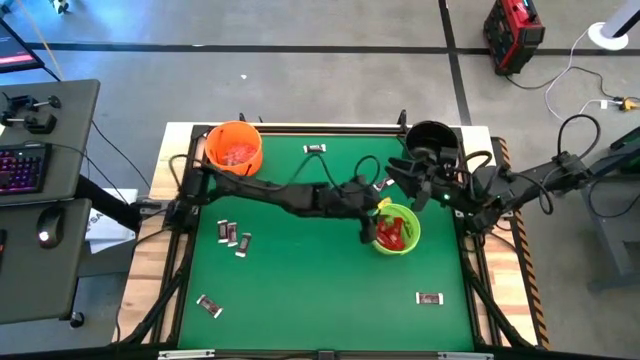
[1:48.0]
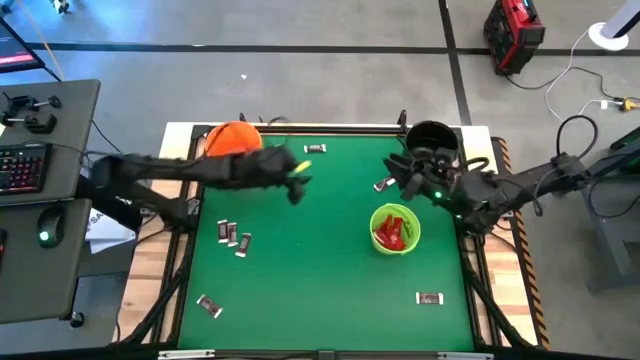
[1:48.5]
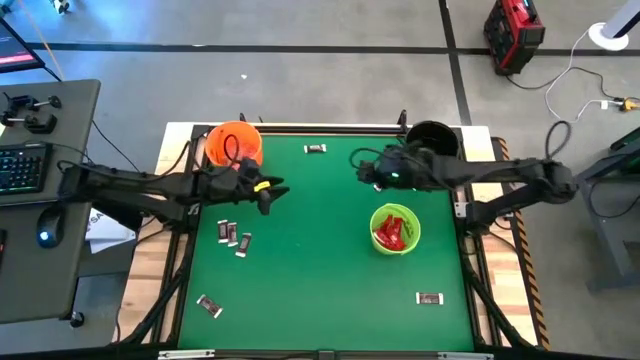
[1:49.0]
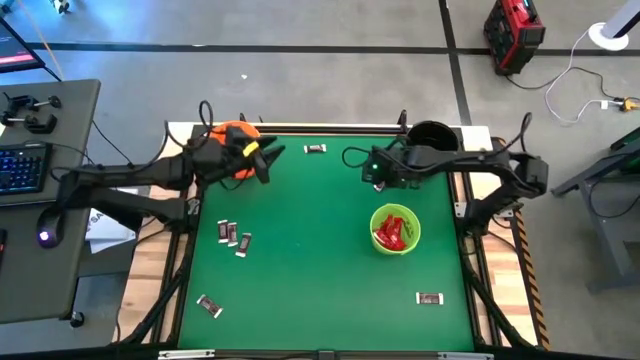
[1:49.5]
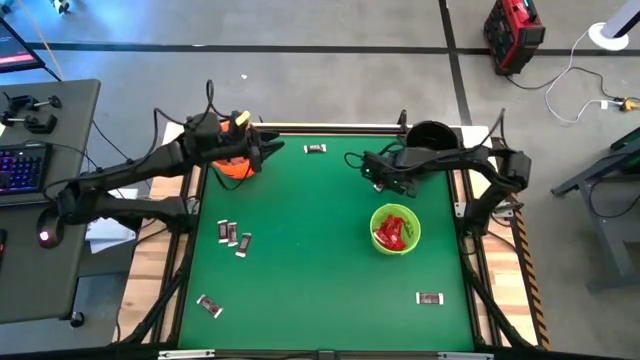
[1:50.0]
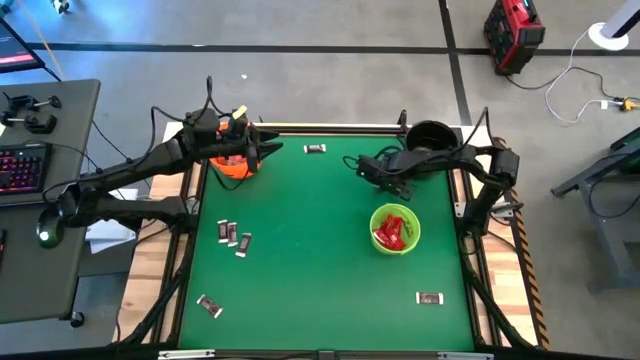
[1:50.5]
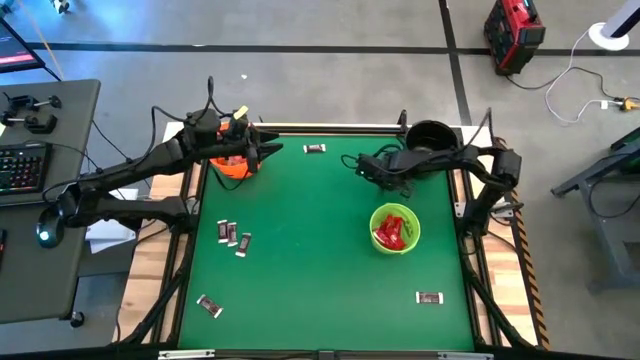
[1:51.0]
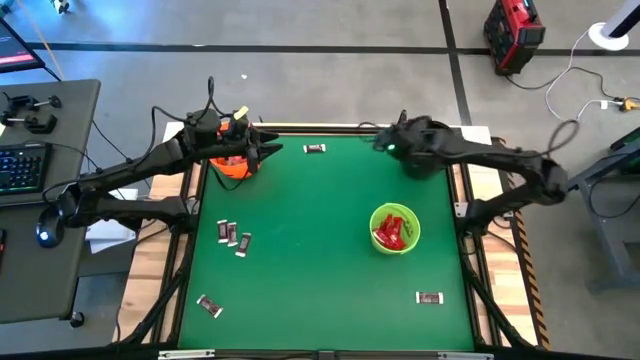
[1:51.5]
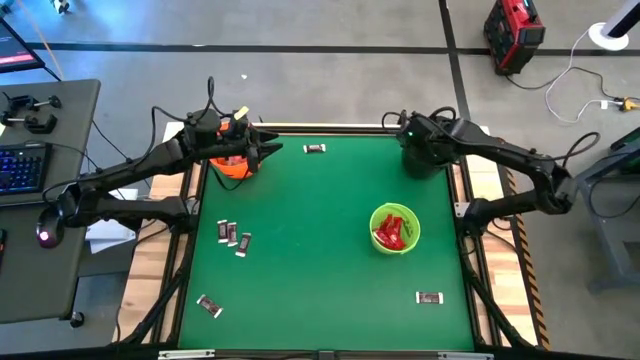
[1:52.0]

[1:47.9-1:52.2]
Task: Sort candy by brand, put in halloween buckets
Put the brown chocolate bar into the black bucket

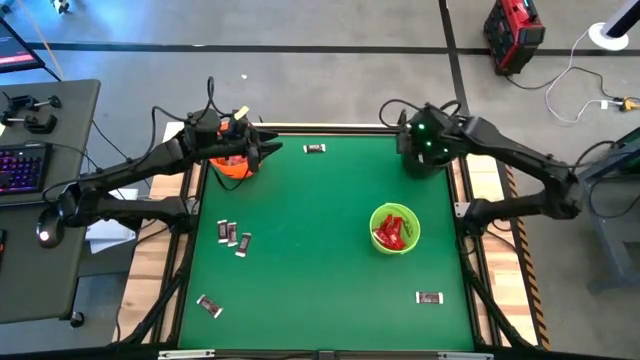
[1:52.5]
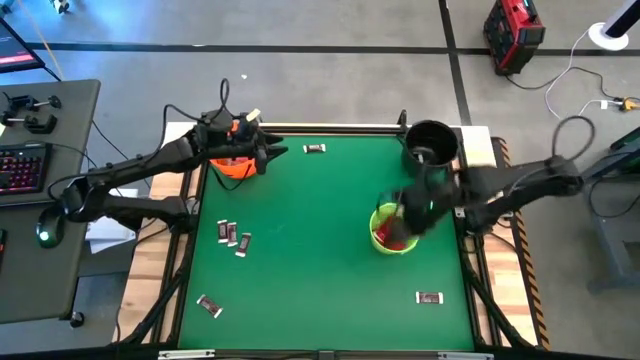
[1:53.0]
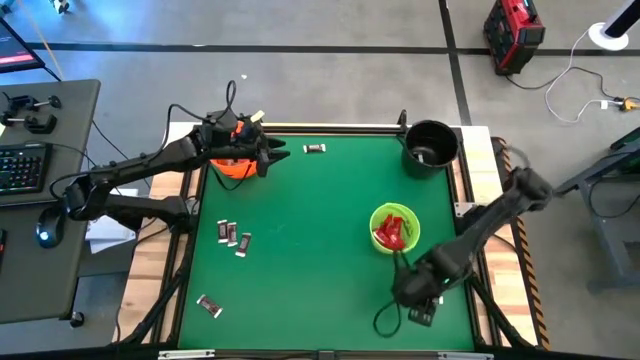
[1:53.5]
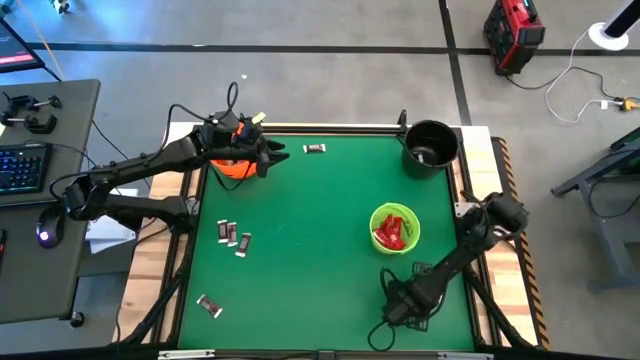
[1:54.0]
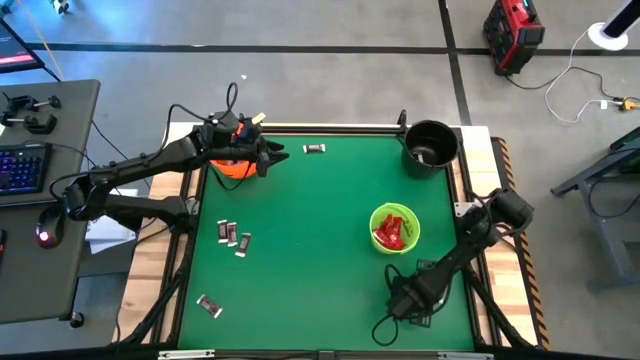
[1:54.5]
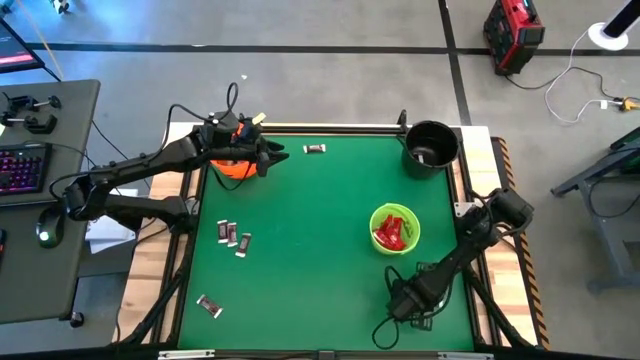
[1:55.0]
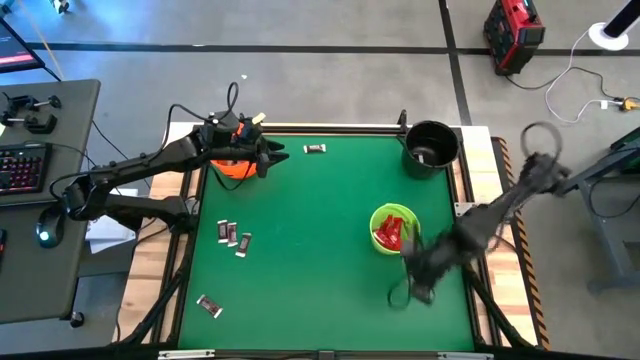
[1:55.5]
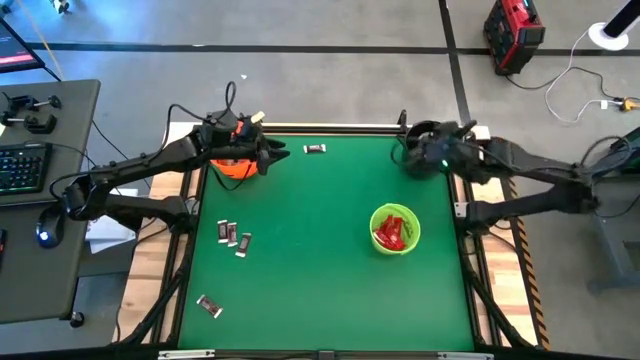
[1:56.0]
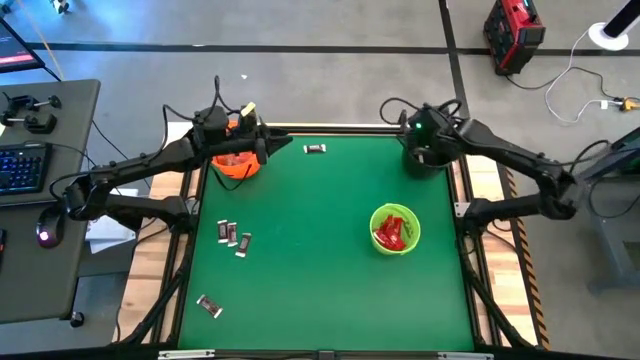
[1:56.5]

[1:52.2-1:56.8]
Put the brown chocolate bar into the black bucket

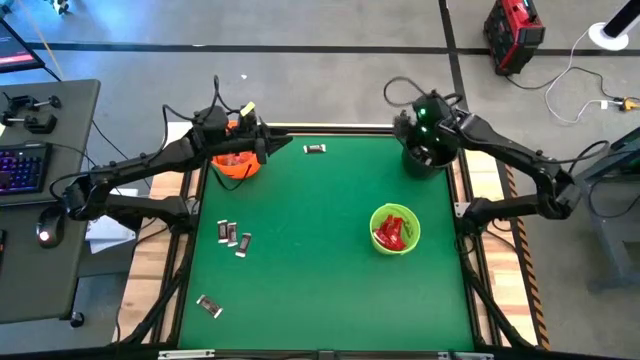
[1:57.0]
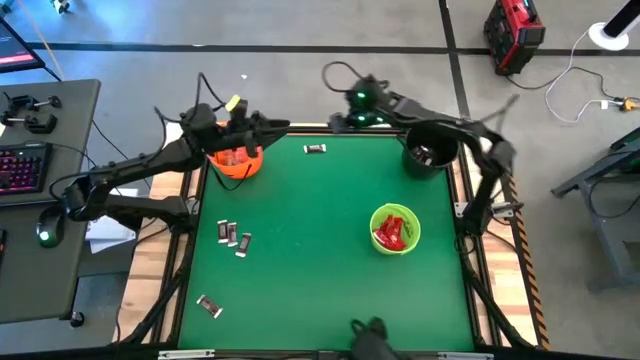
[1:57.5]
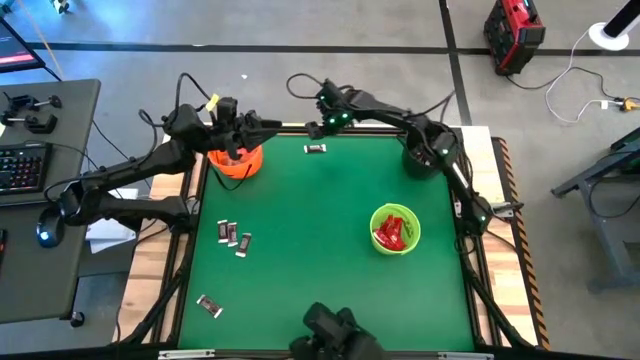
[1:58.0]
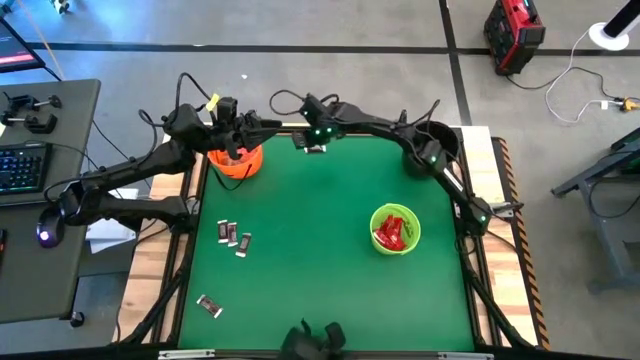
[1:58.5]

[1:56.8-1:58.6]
Put the brown chocolate bar into the black bucket

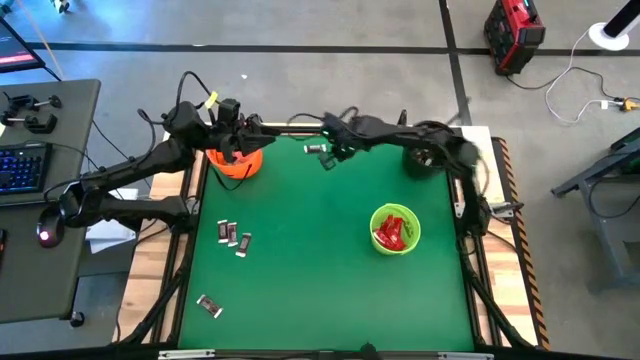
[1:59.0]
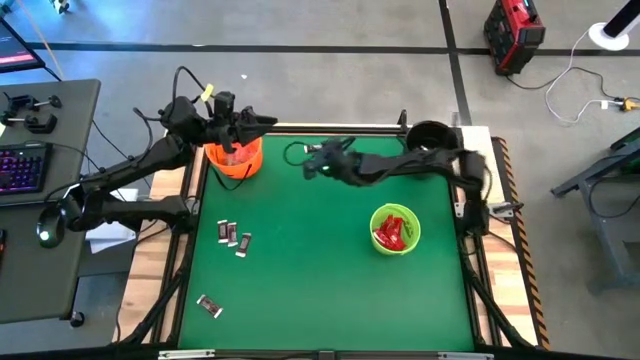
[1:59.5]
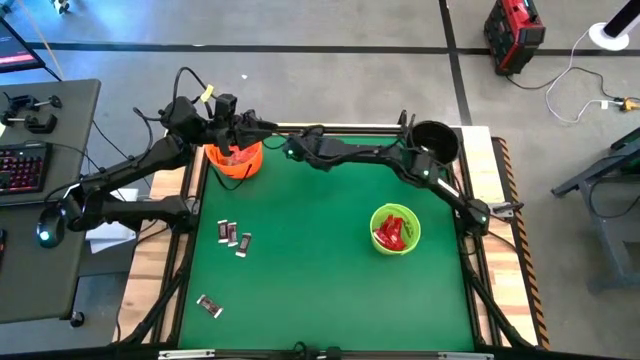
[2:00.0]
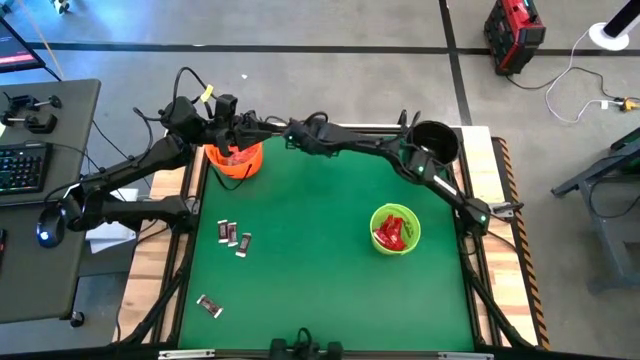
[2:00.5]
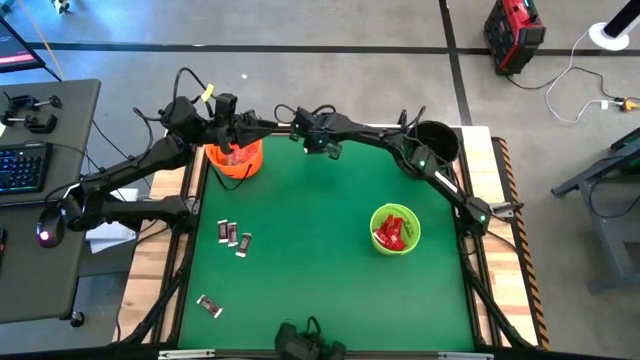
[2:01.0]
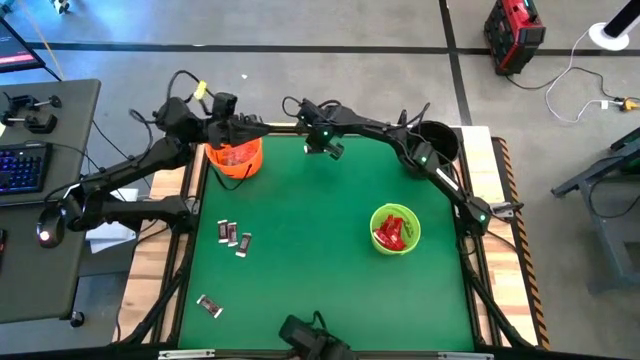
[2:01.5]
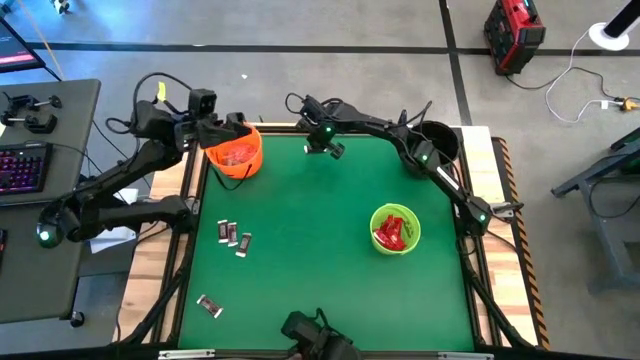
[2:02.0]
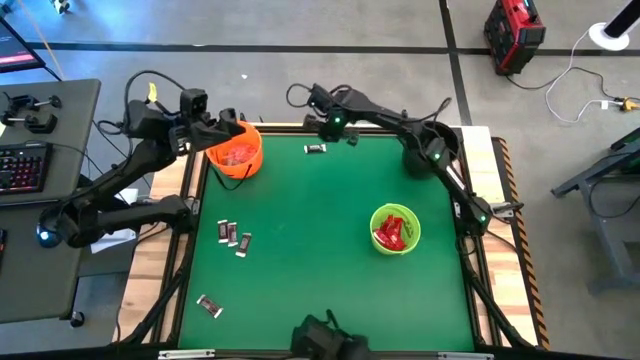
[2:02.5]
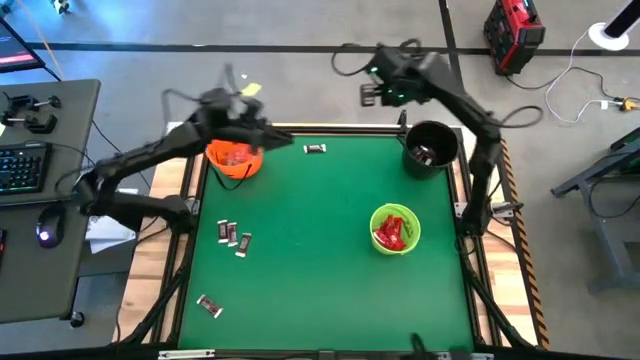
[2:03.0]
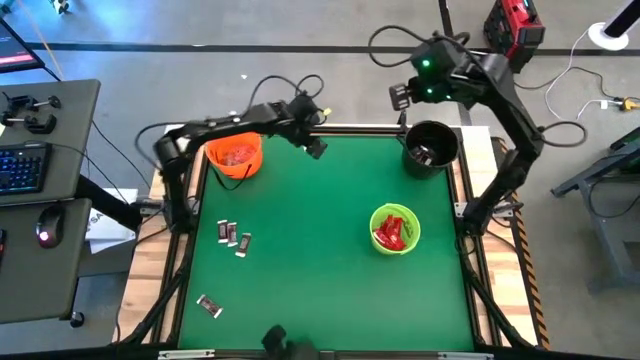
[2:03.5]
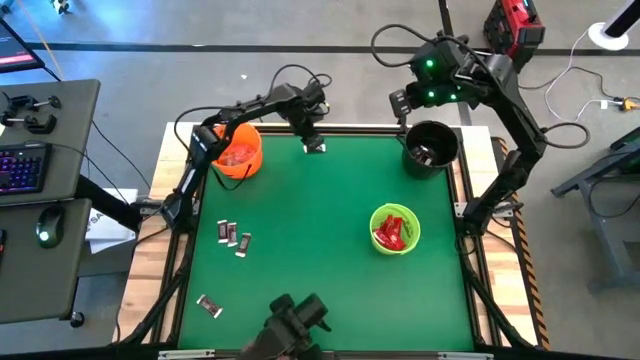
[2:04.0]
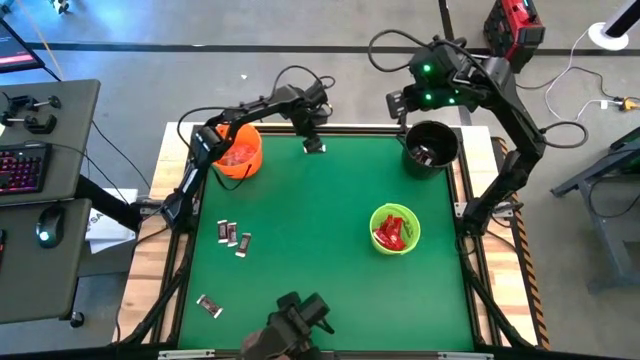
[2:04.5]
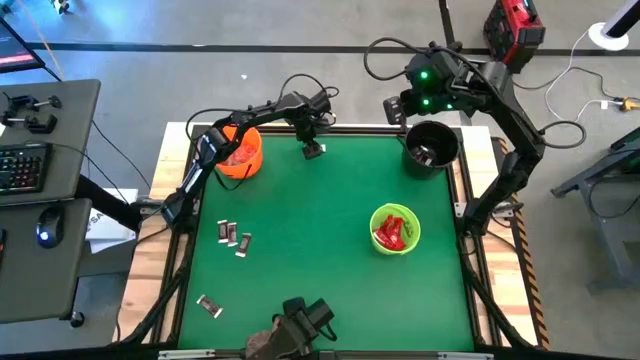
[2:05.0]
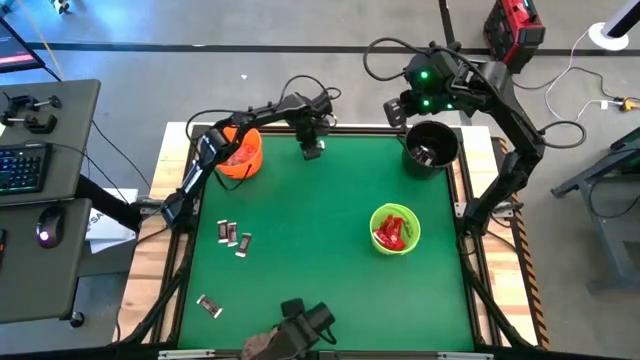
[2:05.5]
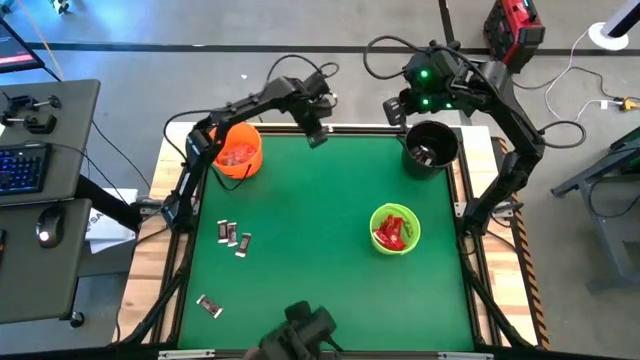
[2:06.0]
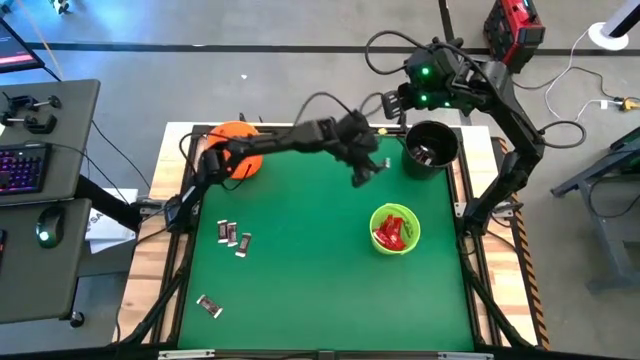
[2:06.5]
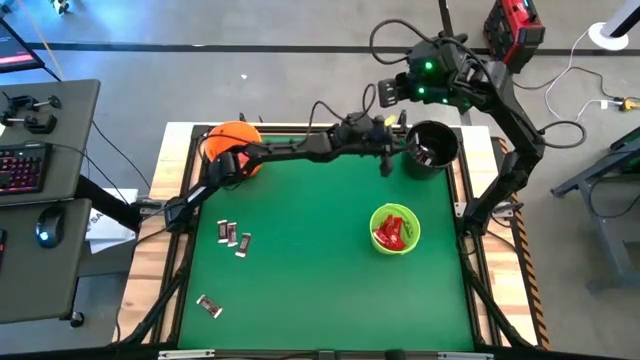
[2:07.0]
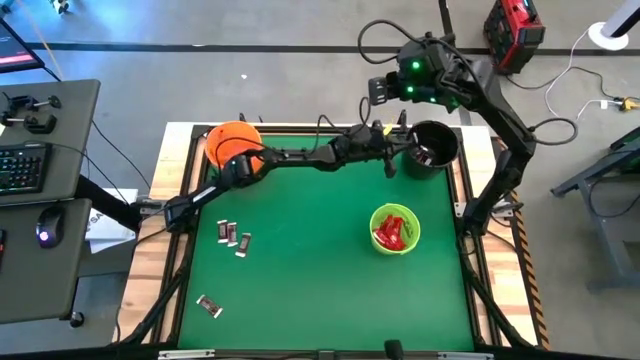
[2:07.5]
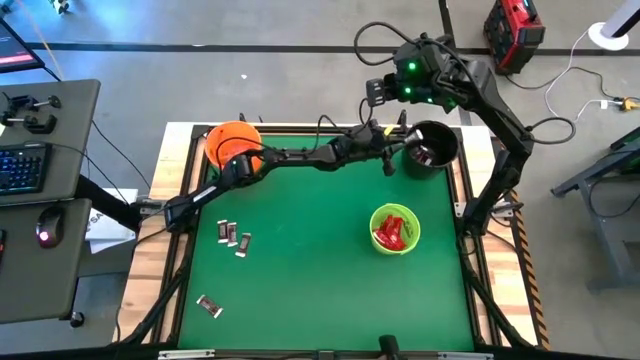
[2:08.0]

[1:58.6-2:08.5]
Put the brown chocolate bar into the black bucket
